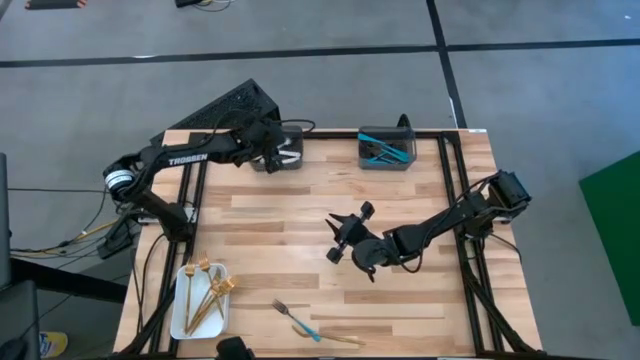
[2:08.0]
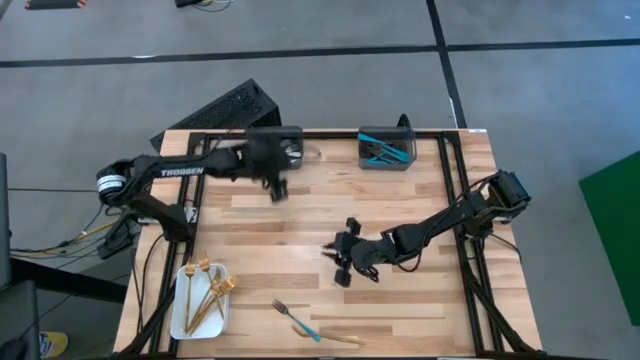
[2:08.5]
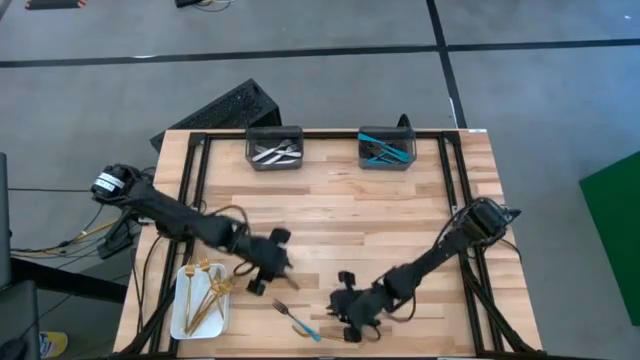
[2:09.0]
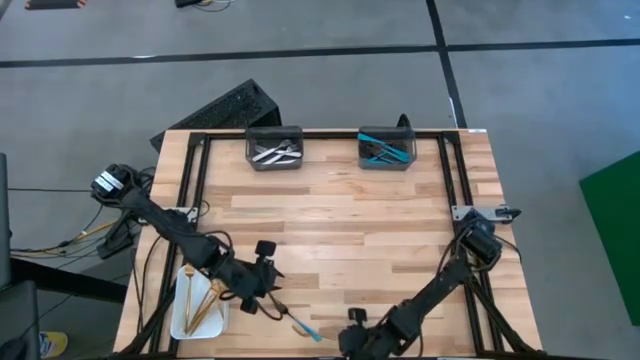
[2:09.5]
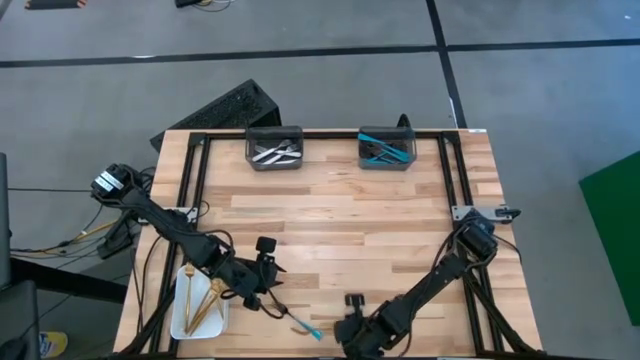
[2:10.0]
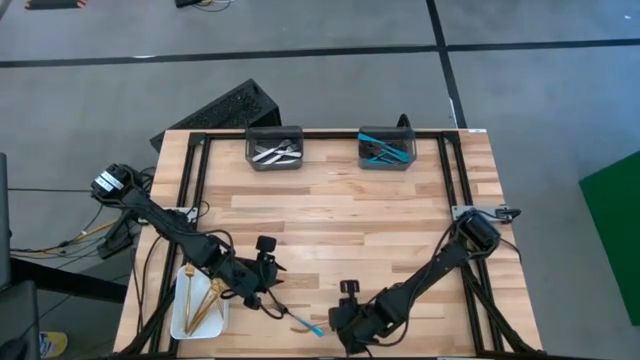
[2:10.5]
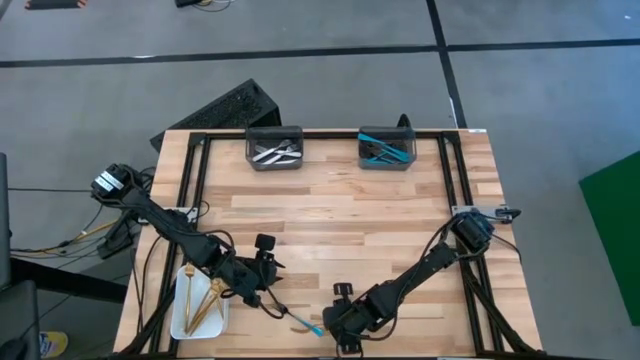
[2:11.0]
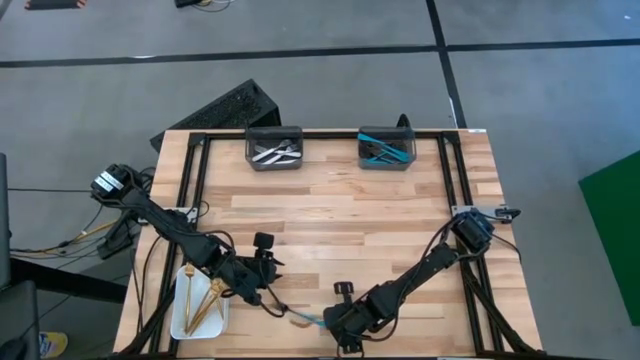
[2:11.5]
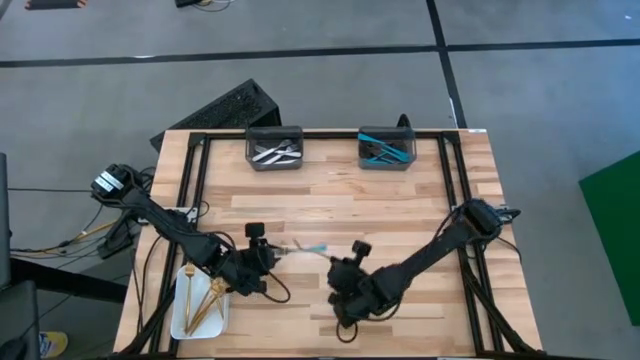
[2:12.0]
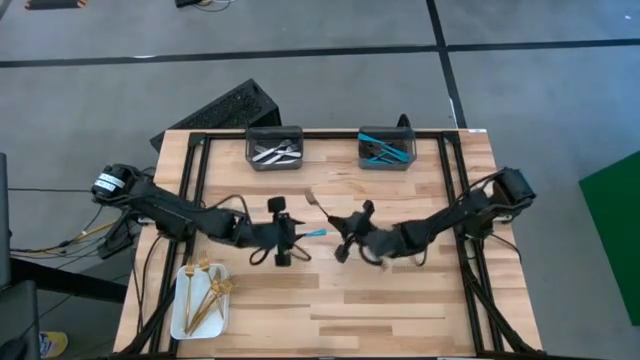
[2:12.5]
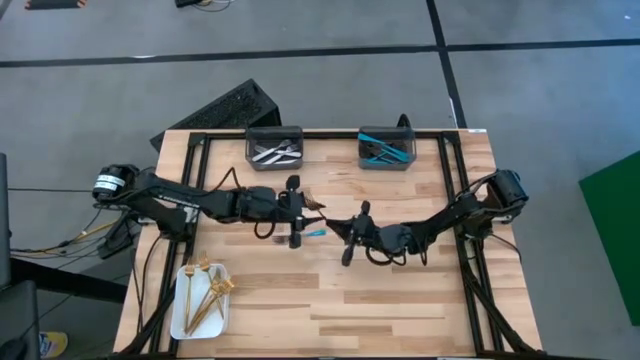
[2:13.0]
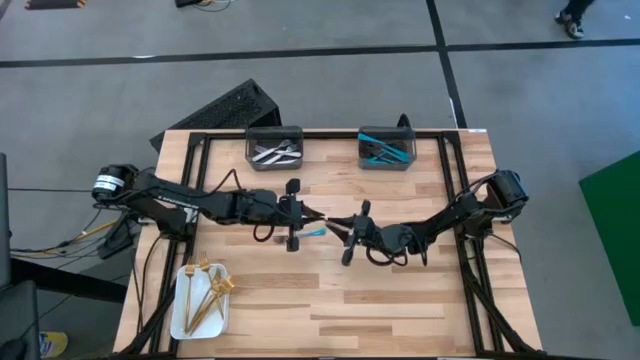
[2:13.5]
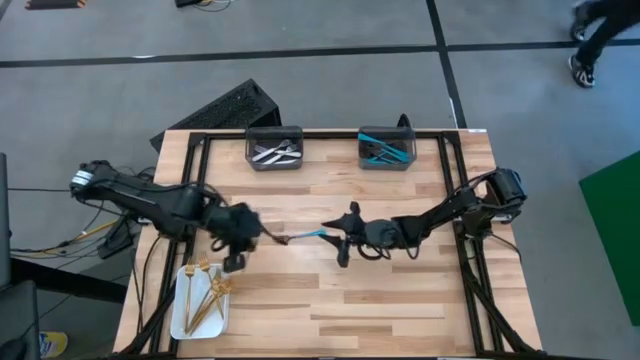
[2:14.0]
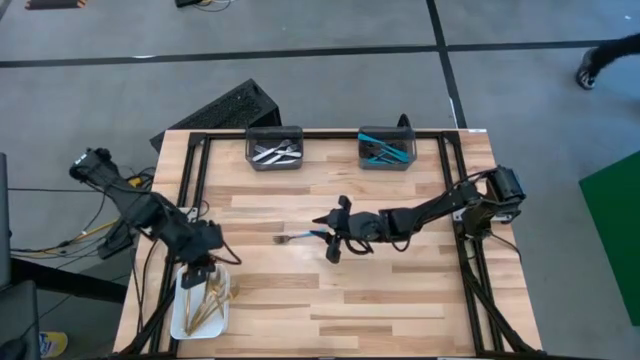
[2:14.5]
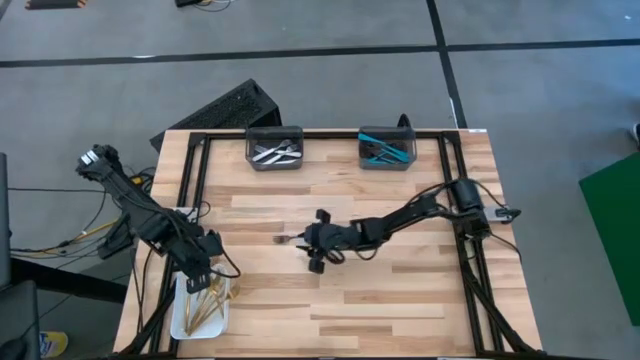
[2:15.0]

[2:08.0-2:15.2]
Task: Sort silverware by color (type)
Put the gold fork into the white bin

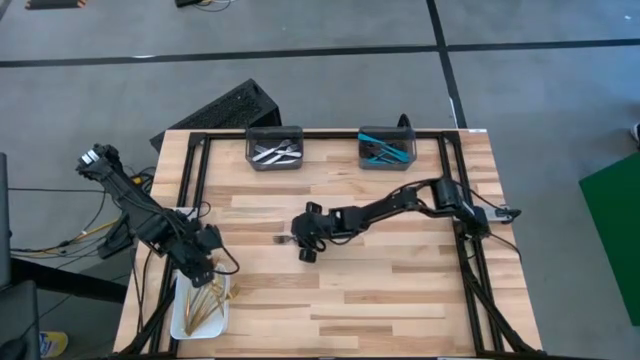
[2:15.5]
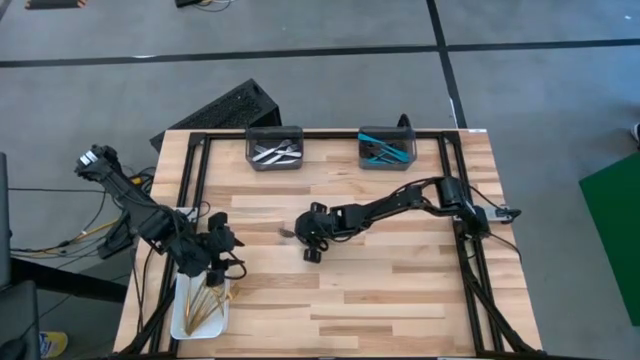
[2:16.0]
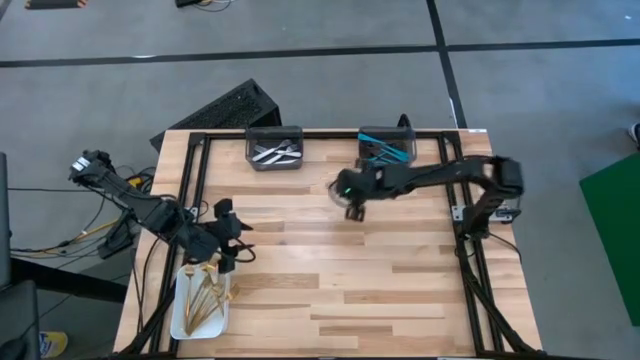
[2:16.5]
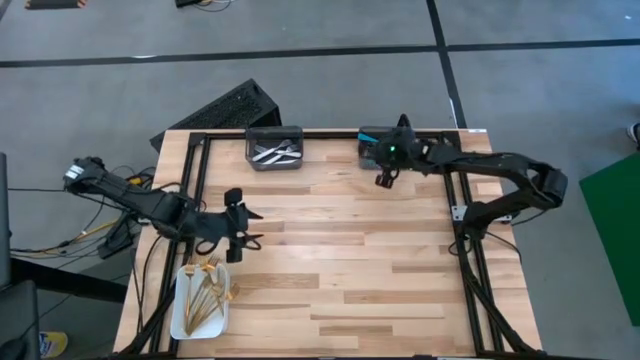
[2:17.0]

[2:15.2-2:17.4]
Put the blue fork into the right black bin

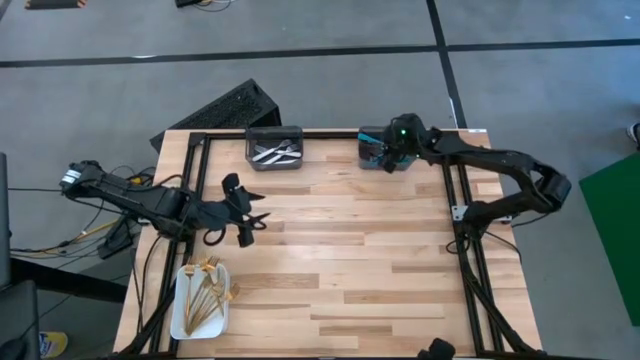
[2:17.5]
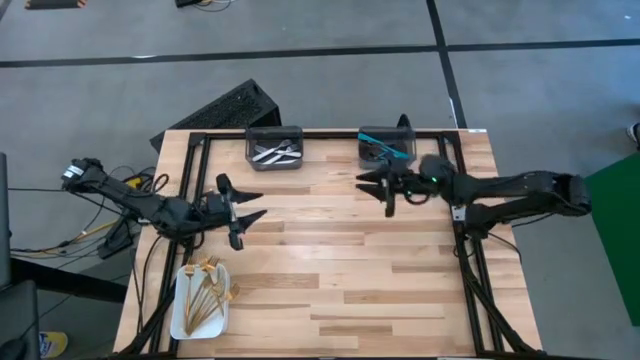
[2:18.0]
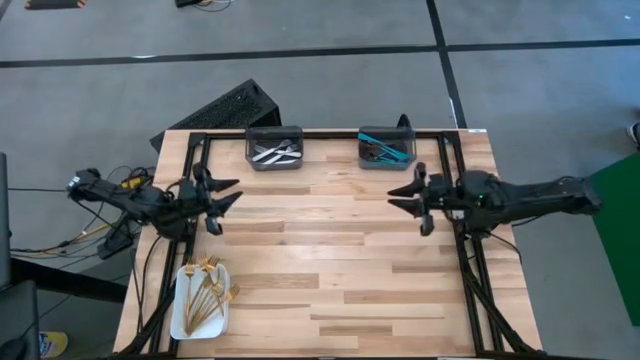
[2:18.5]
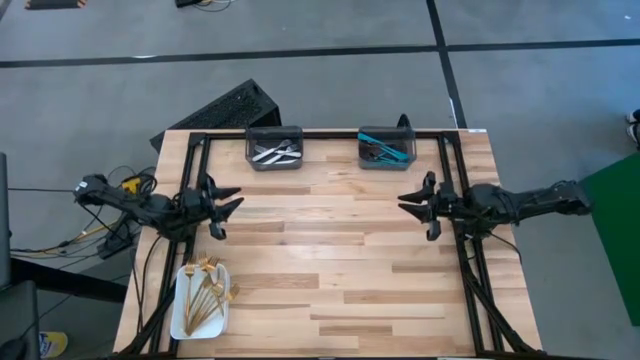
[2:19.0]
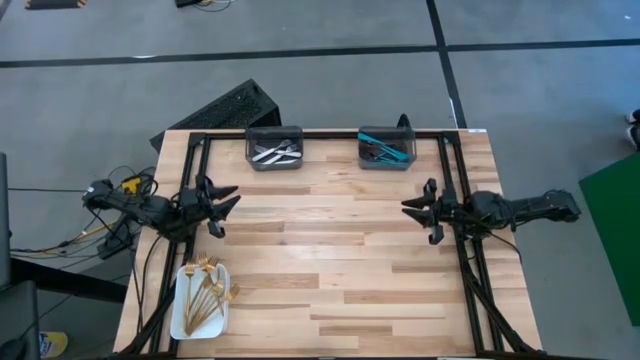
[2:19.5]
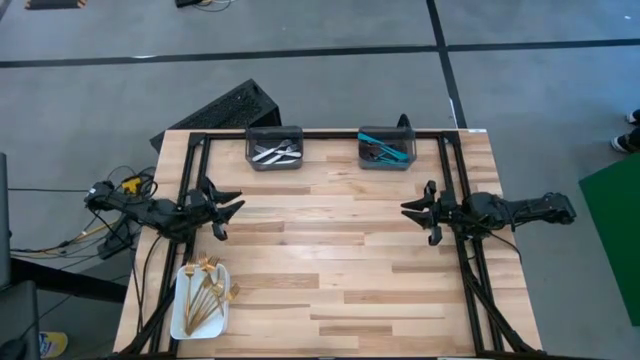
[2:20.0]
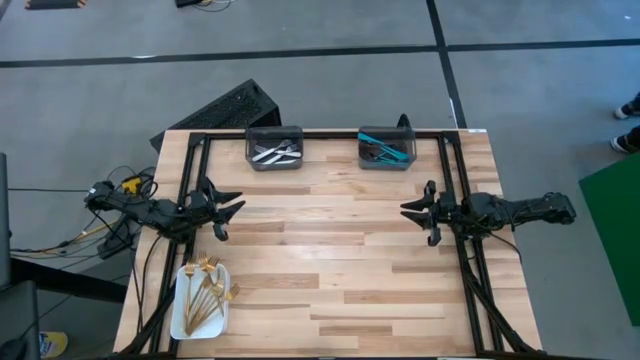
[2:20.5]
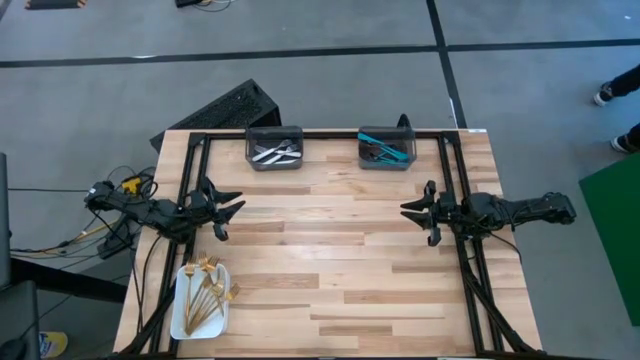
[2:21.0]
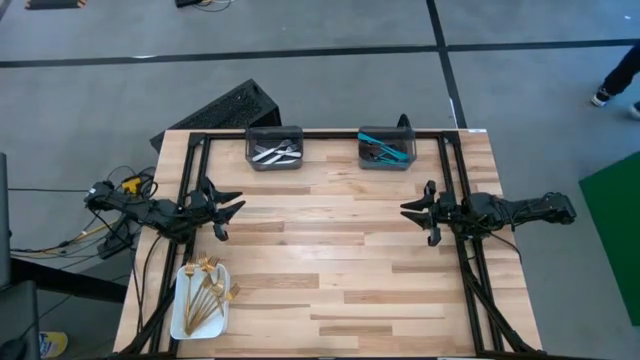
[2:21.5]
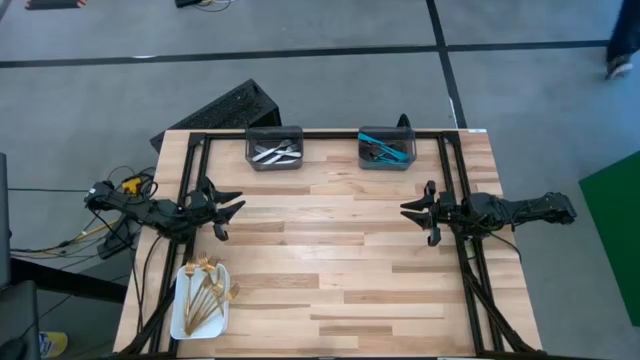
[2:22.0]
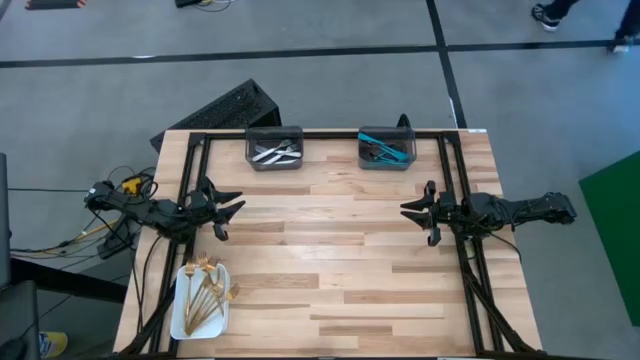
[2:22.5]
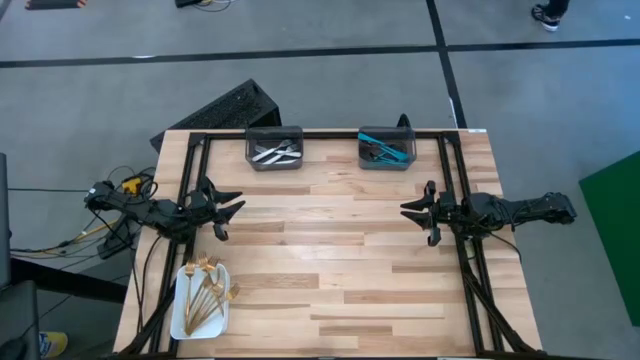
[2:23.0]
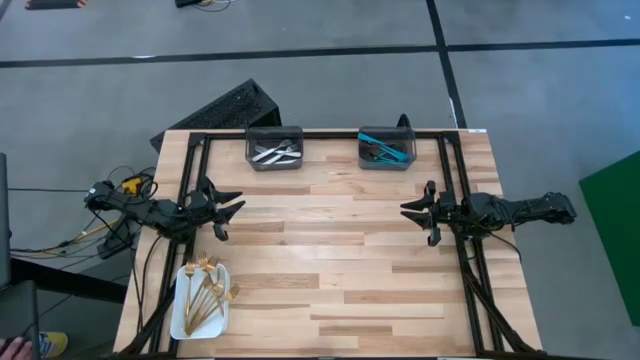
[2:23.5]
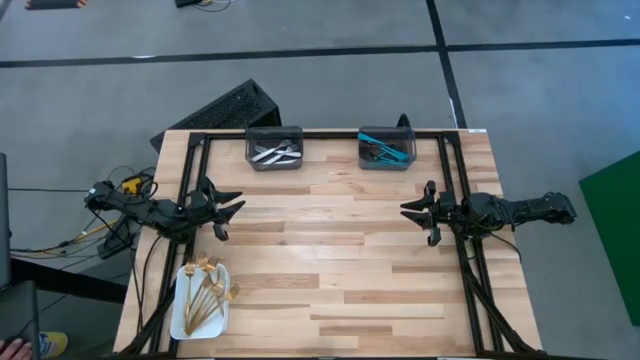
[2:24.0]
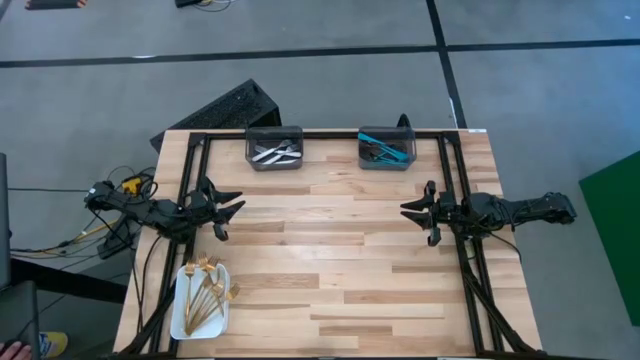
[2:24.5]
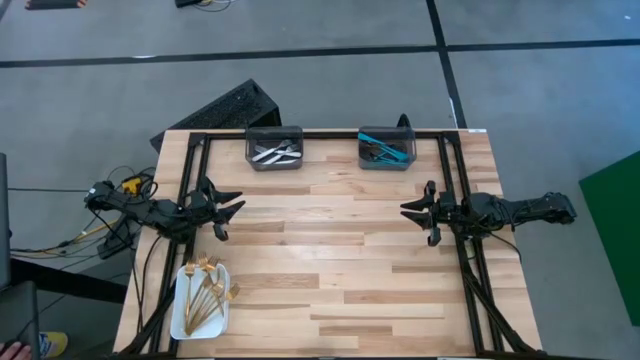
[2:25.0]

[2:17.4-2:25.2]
Return to Home Position

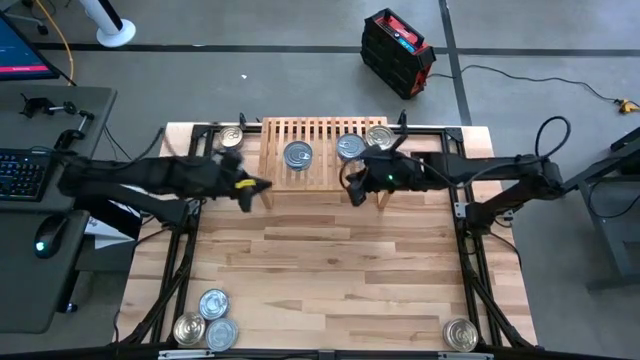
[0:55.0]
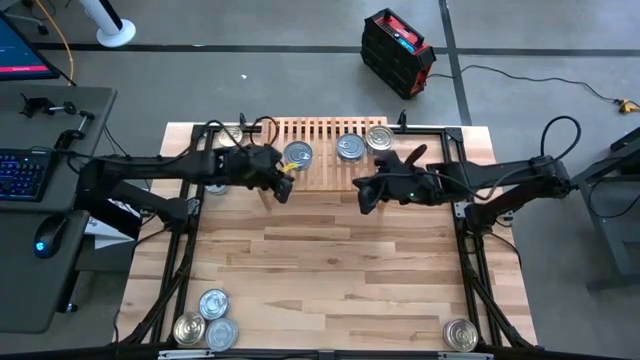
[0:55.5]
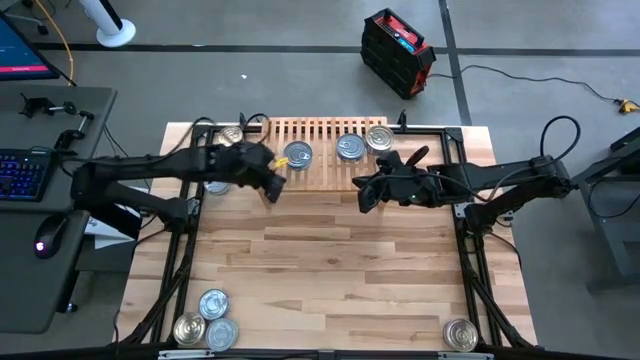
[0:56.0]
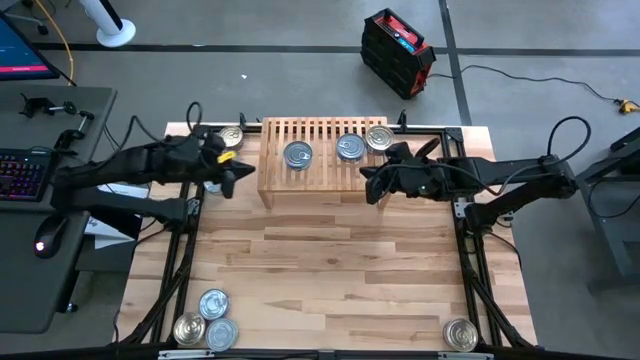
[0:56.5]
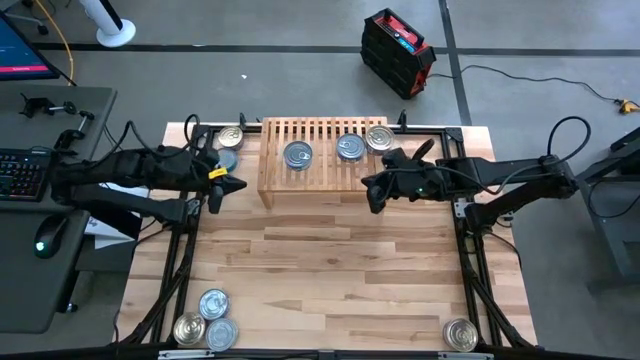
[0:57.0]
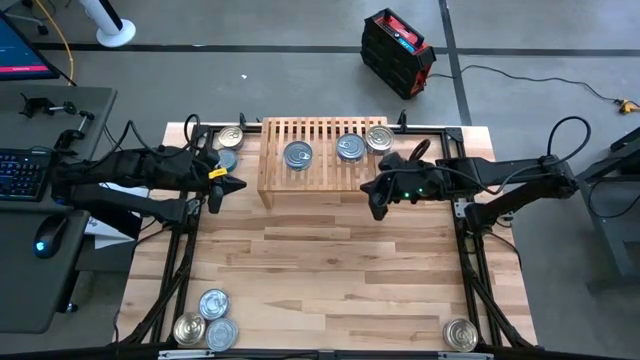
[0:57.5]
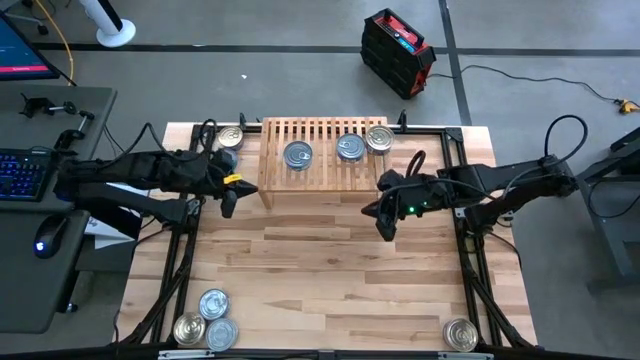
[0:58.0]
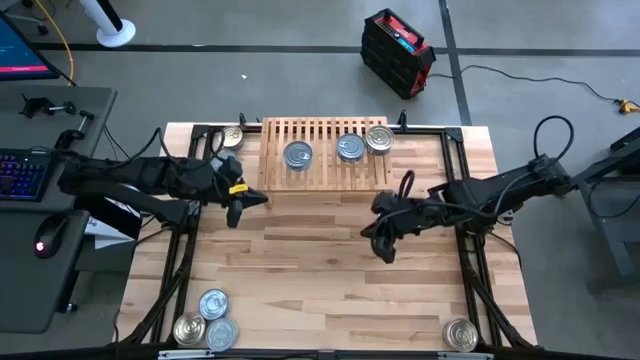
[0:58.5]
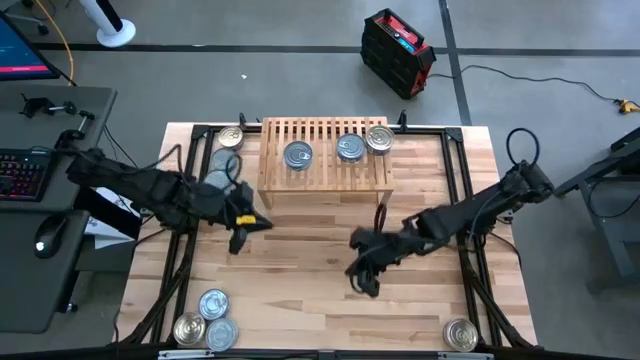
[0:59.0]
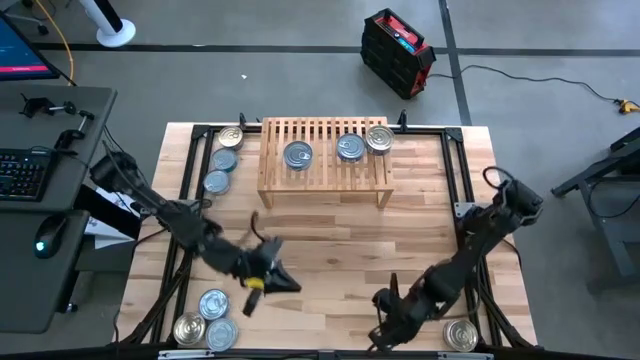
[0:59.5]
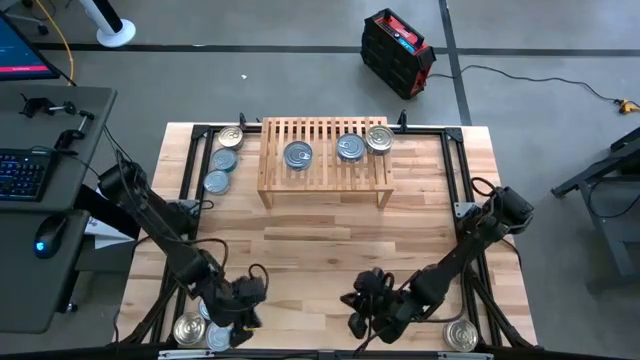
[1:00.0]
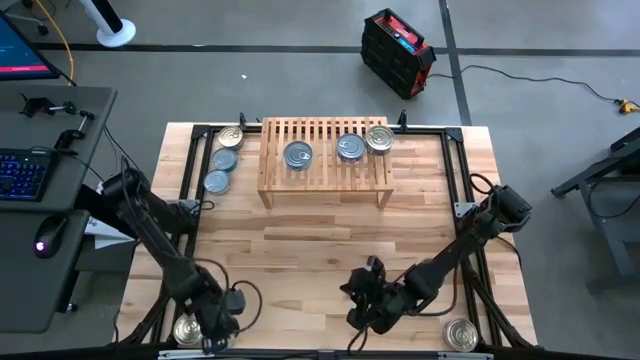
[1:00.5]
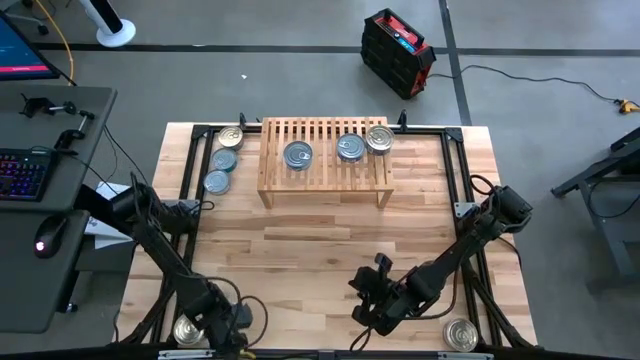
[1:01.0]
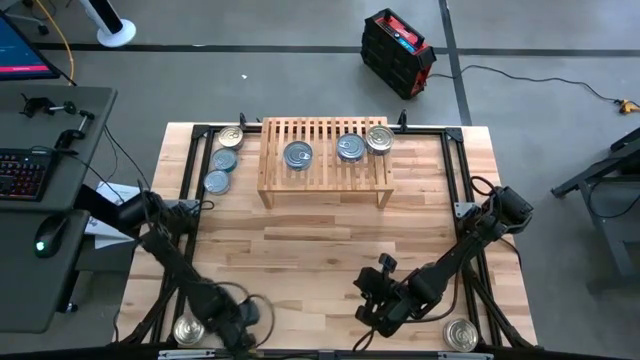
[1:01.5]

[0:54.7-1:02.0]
Task: Stack canned seafood by type on shelf
Move the green tuna can to the center of the table
